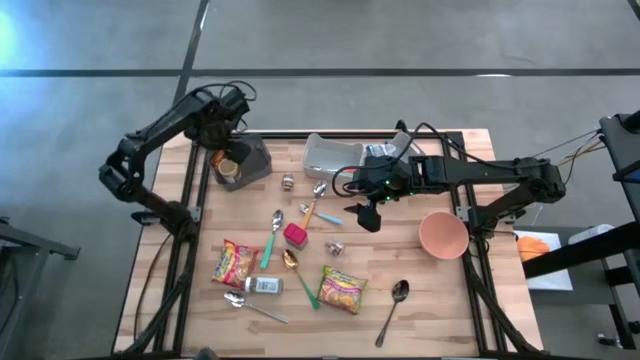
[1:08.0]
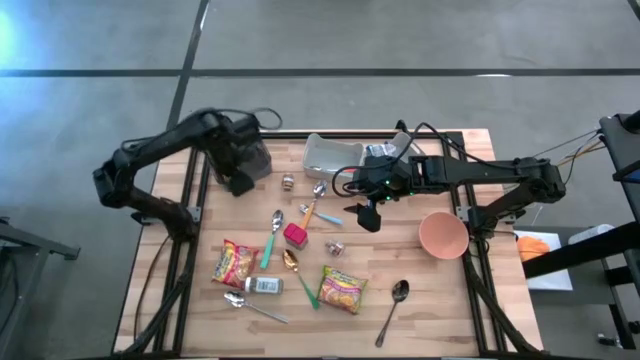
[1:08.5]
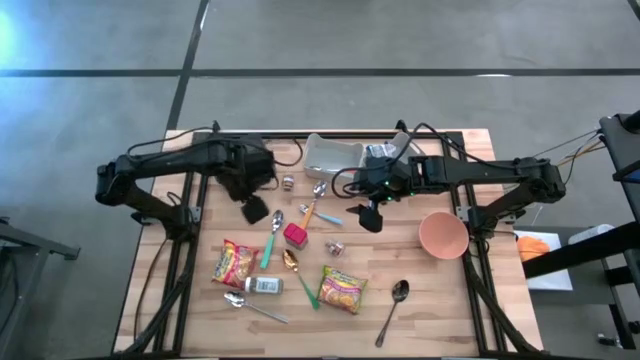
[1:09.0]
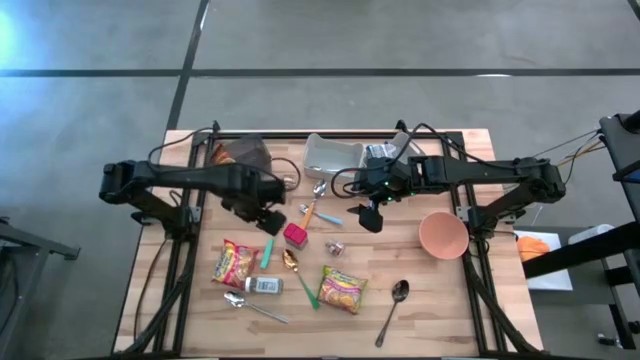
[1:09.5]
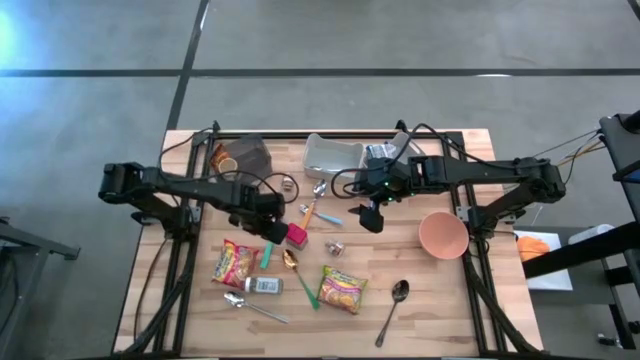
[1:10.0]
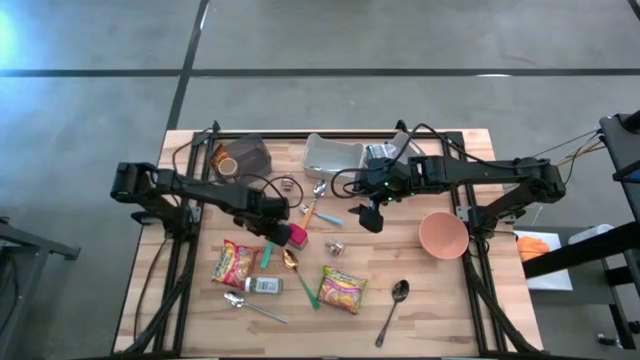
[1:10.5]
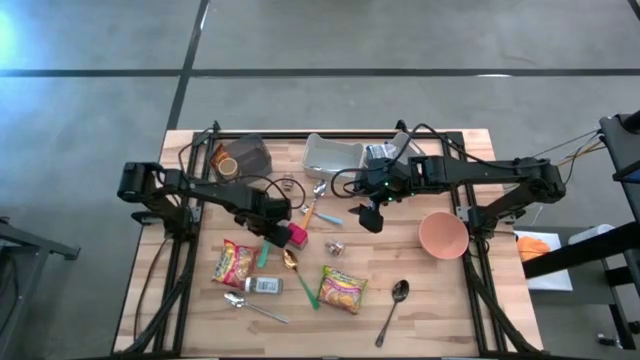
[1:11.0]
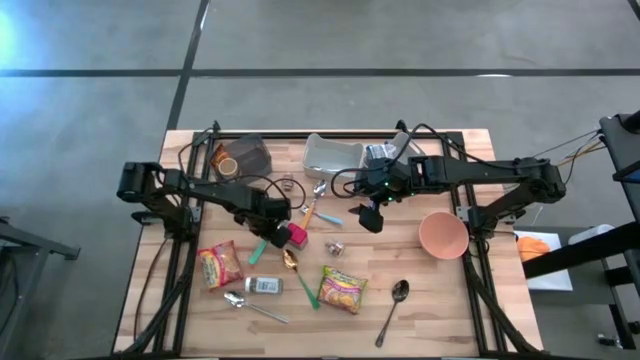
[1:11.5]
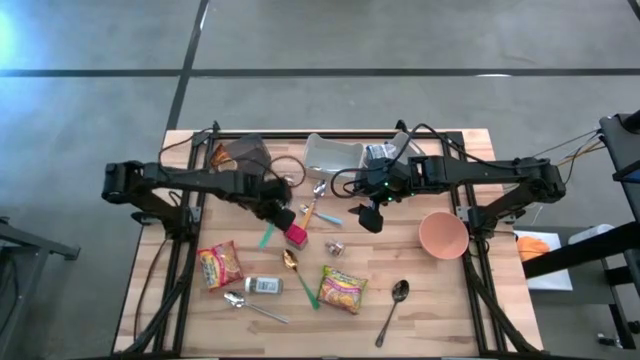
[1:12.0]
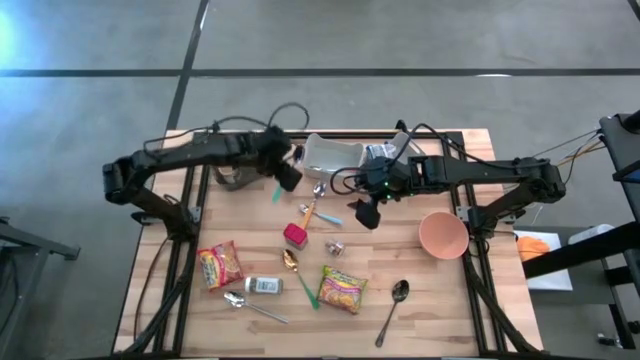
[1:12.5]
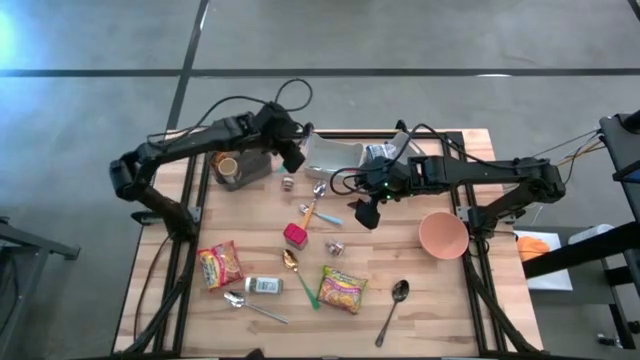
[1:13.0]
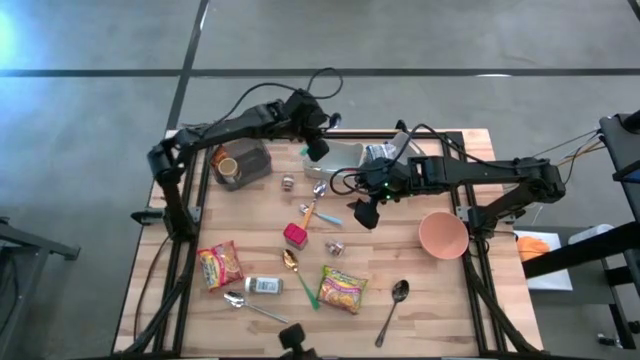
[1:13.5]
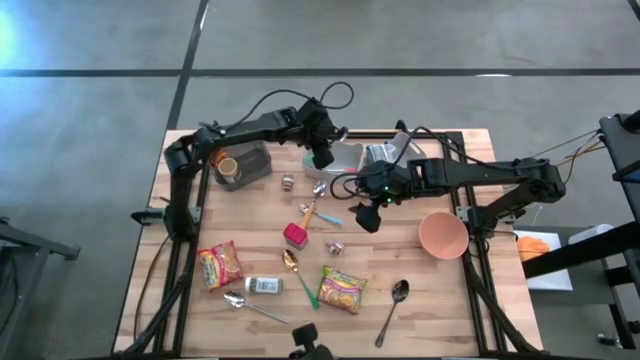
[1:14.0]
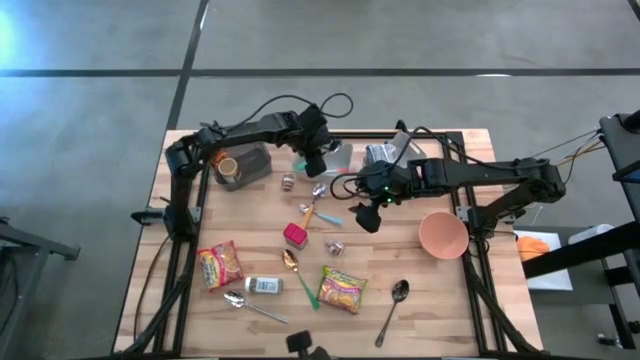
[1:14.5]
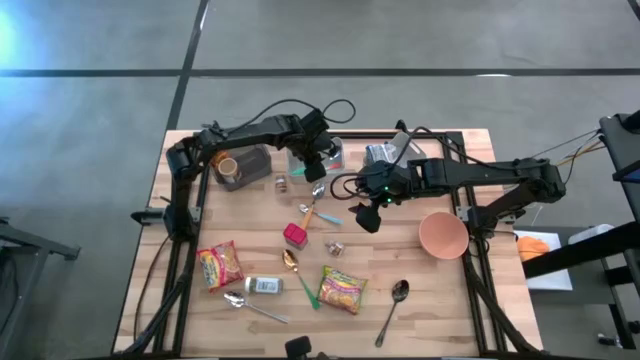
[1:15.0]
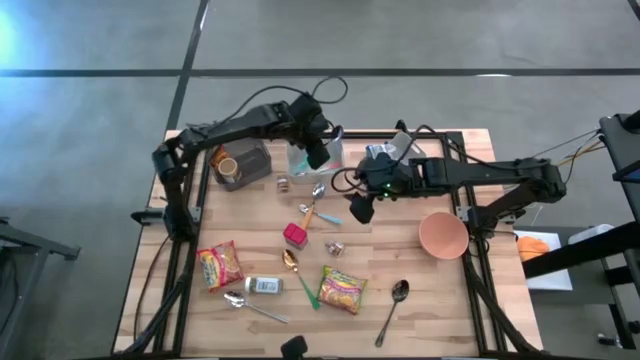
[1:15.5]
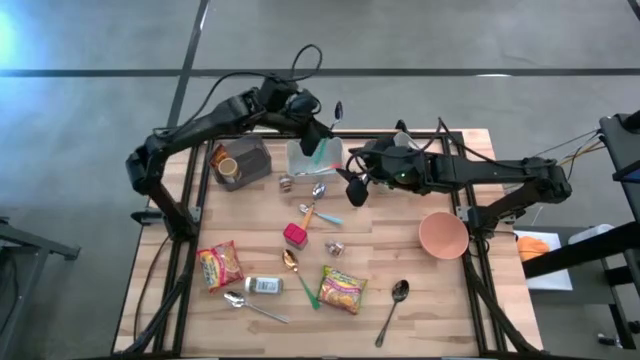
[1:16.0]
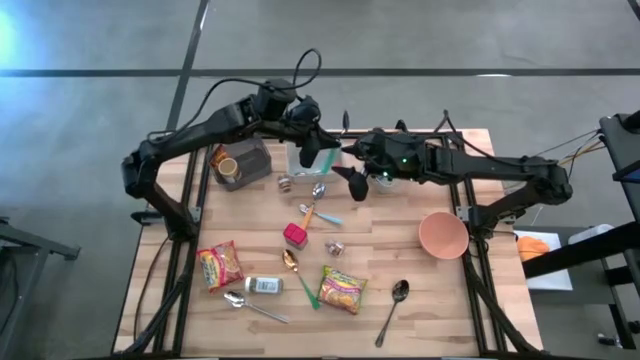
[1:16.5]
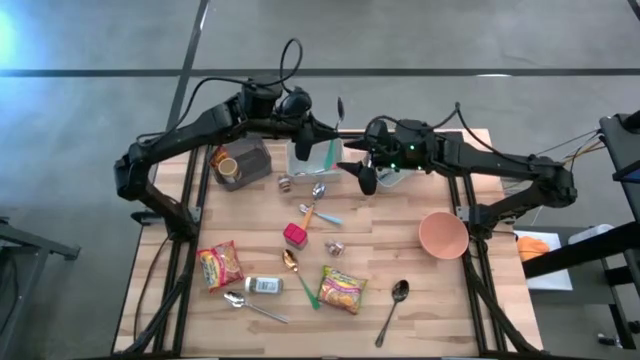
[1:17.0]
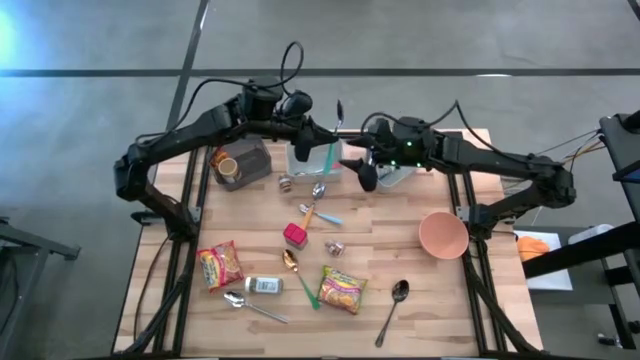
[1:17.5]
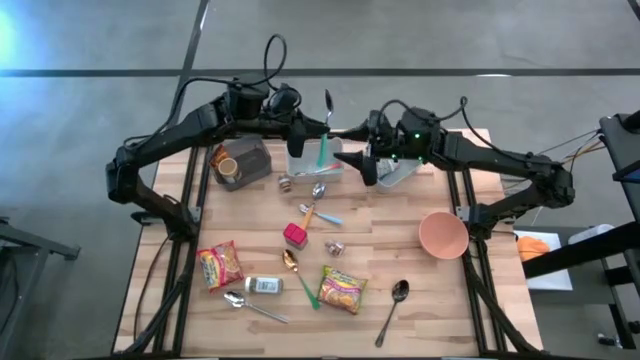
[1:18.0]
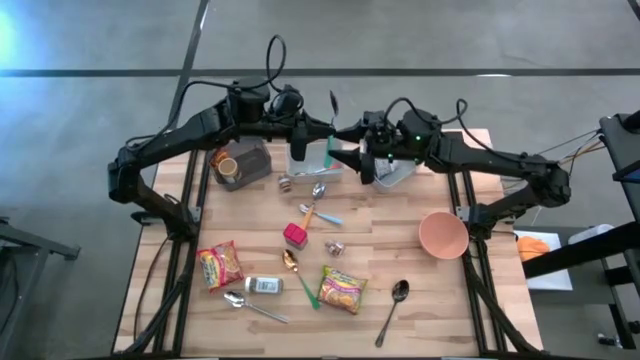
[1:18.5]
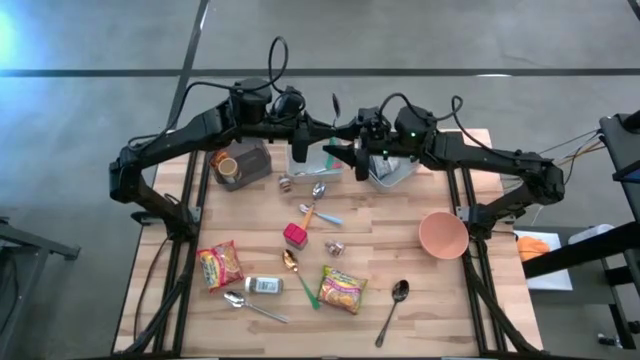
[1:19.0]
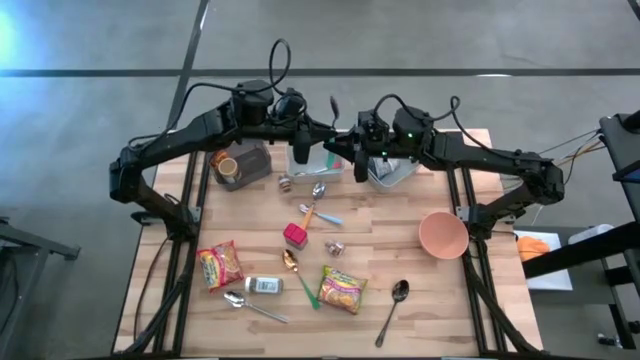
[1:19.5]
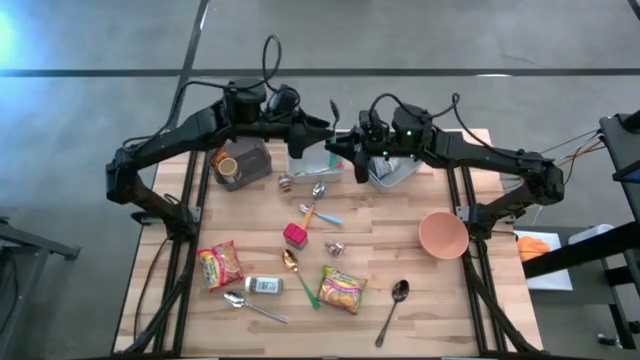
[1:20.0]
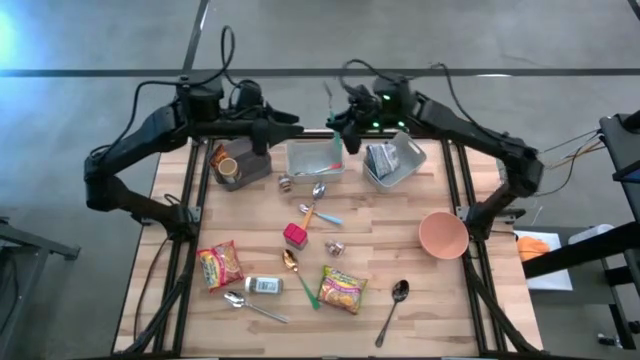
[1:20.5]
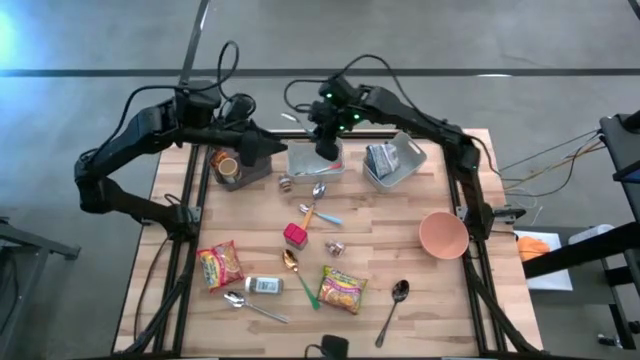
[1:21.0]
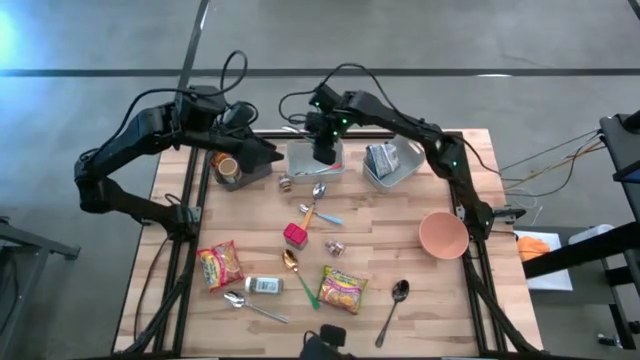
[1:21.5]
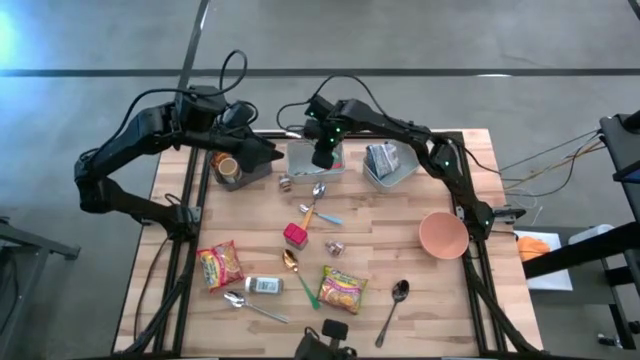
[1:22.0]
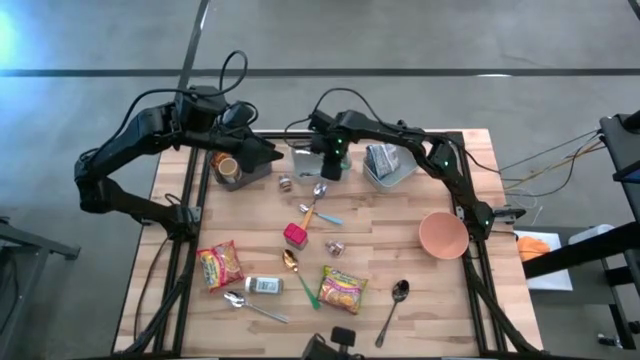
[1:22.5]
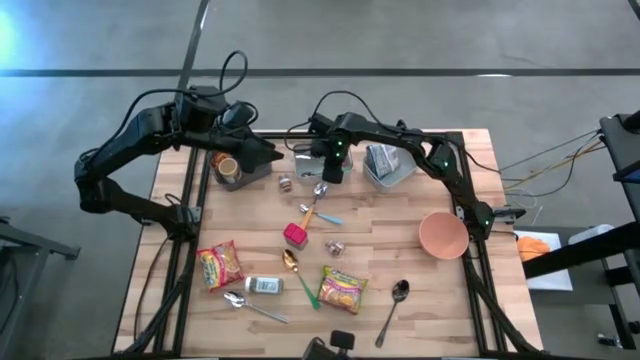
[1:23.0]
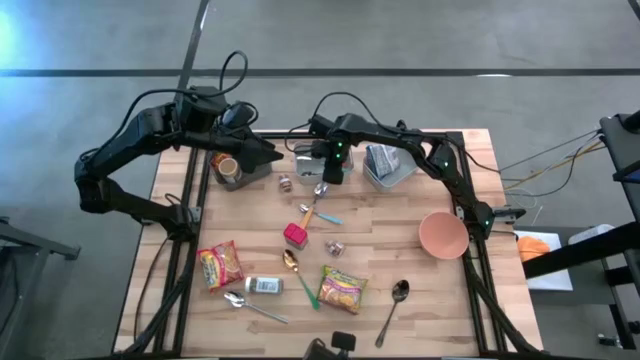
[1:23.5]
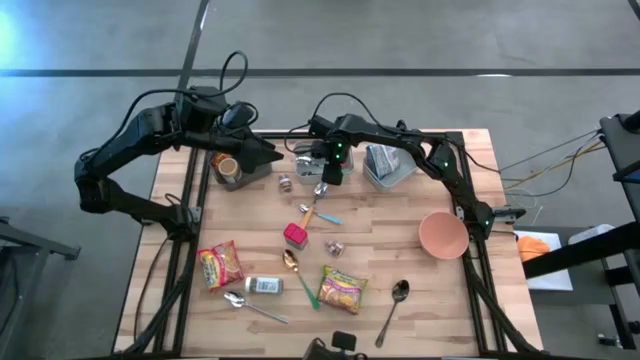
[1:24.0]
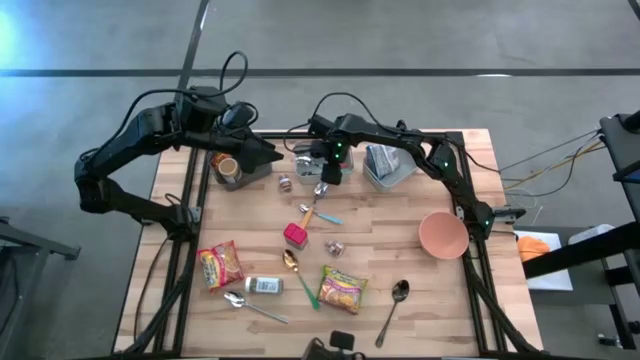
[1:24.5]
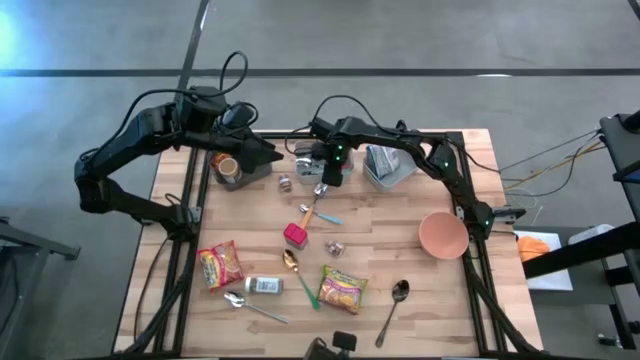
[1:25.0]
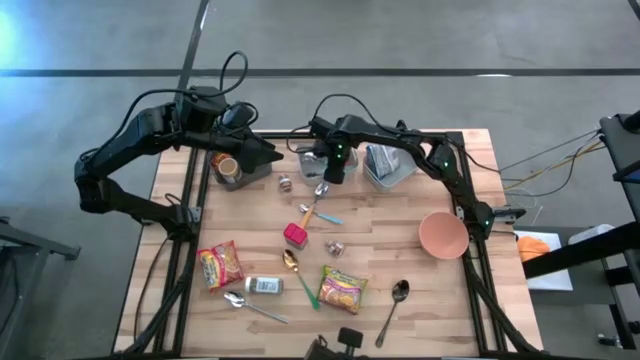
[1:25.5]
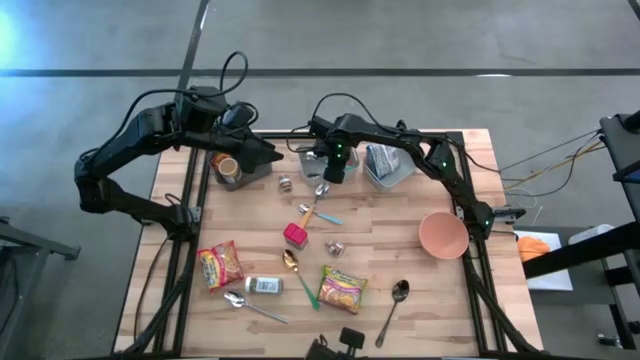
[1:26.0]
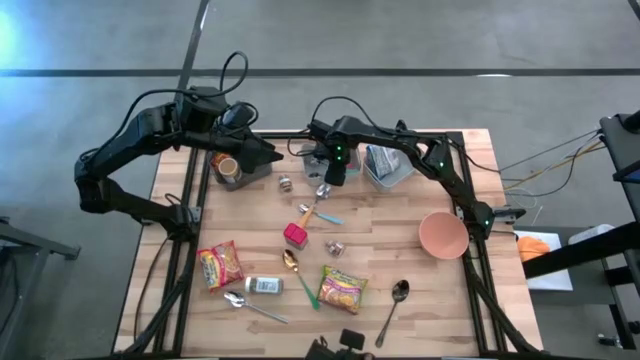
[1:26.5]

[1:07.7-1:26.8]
Put the big blue spoon into the left gray bin
